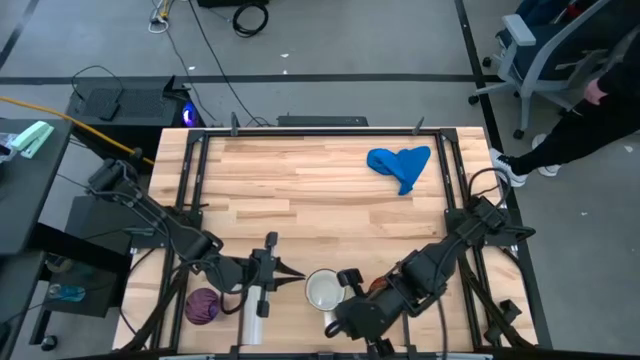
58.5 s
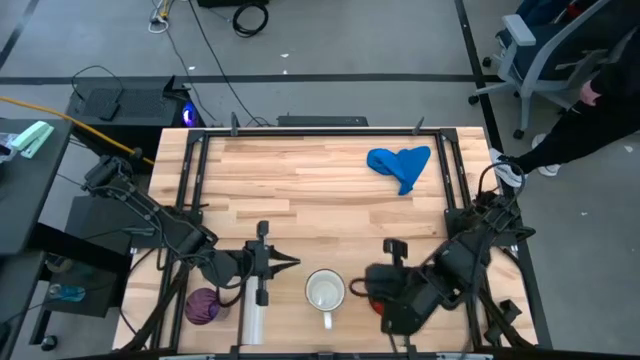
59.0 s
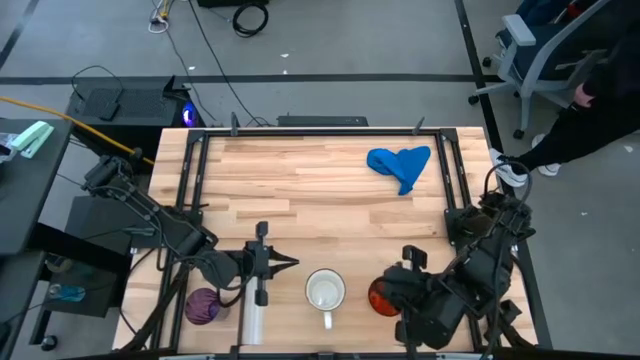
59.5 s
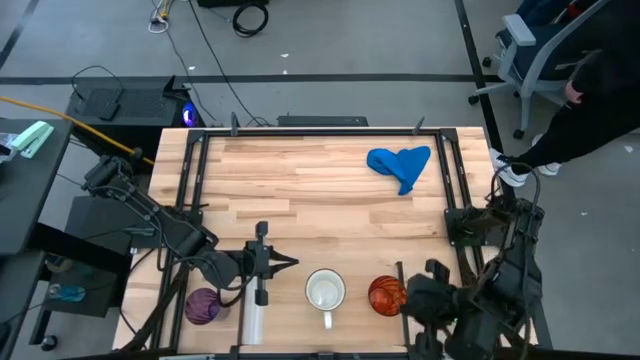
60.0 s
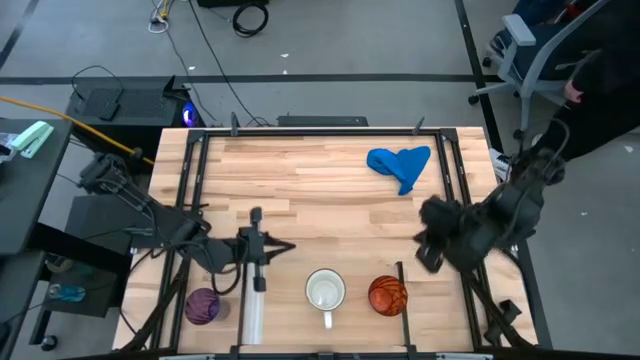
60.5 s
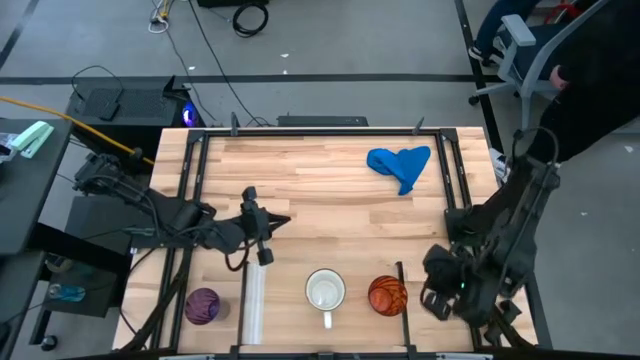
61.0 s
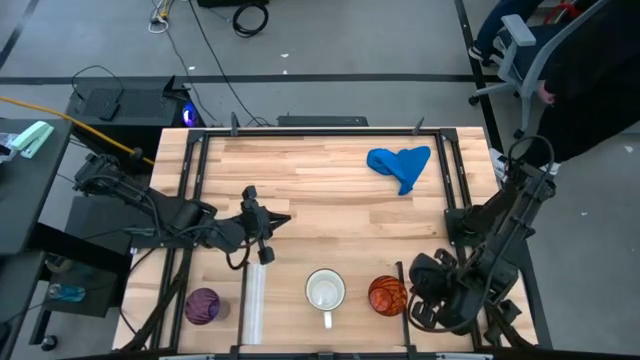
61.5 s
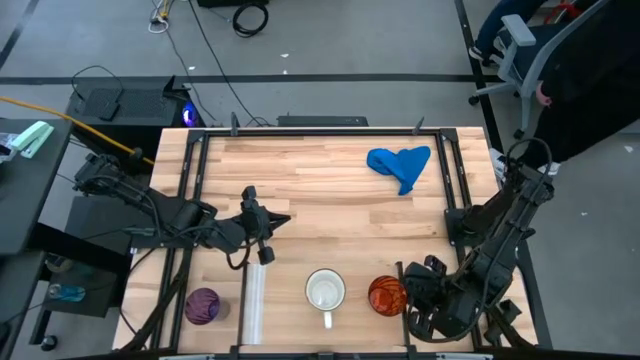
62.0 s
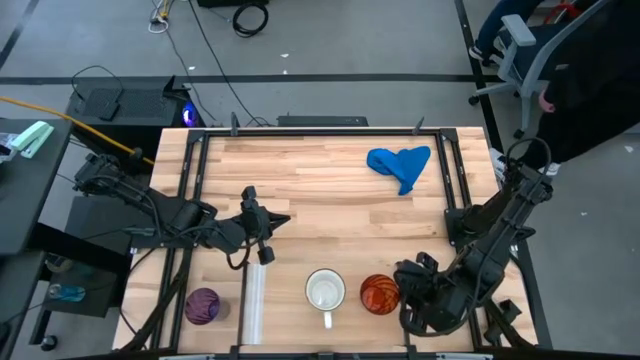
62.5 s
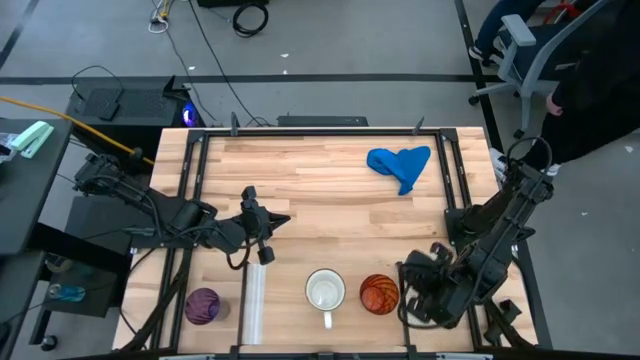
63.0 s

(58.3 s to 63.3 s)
Task: Stack small to large cups/mugs on shelf
Adjust the orange cup on the shelf

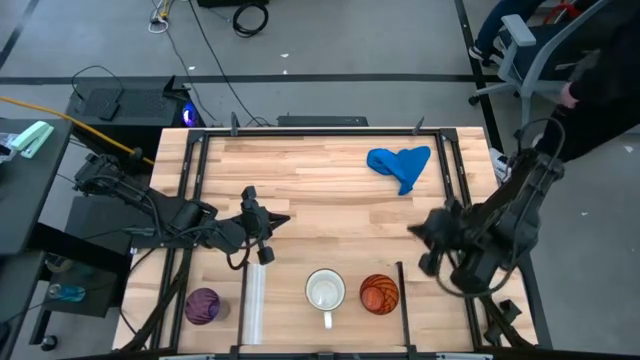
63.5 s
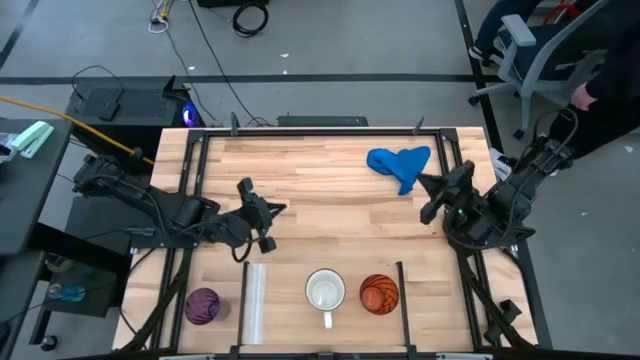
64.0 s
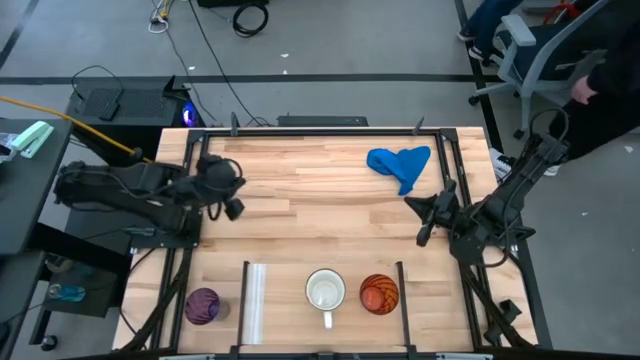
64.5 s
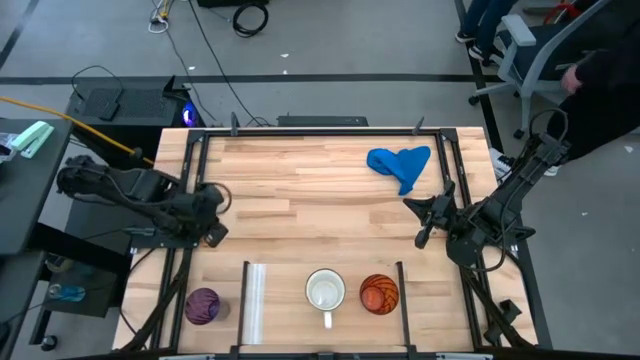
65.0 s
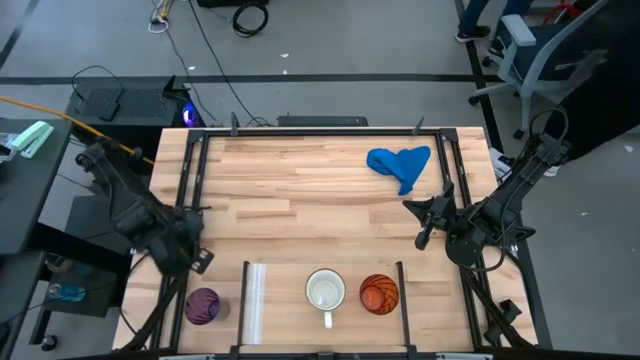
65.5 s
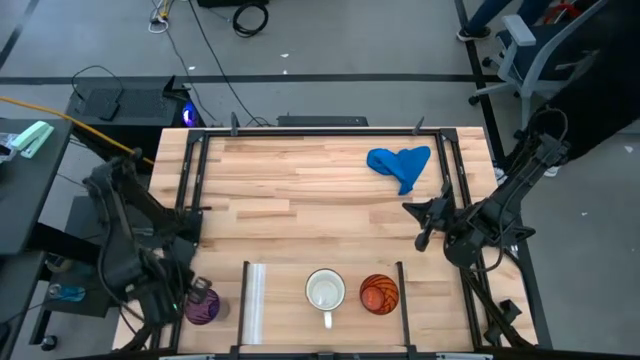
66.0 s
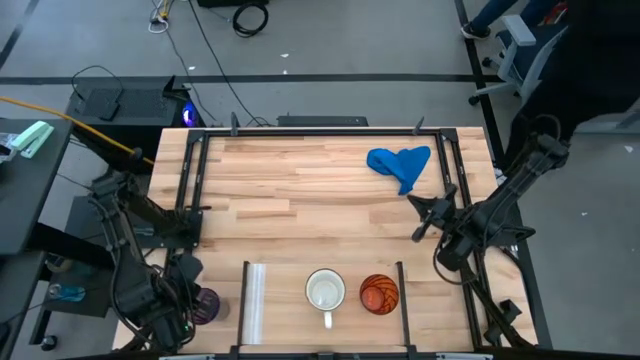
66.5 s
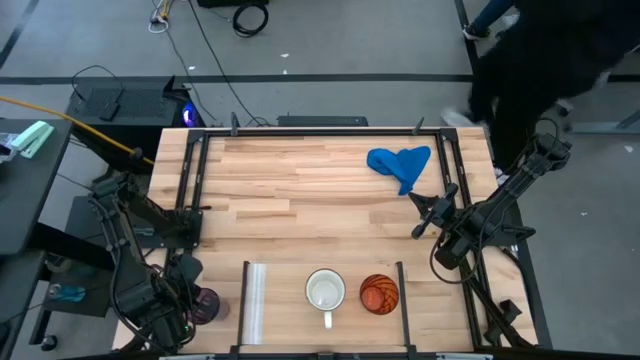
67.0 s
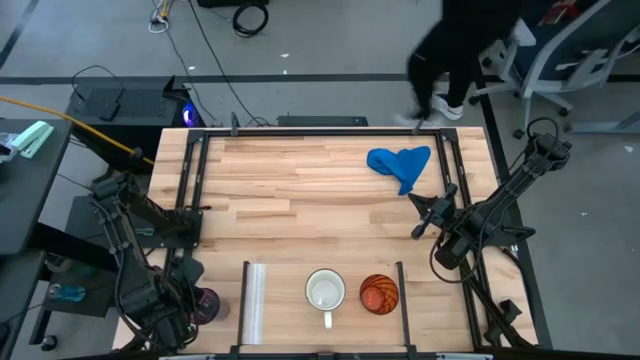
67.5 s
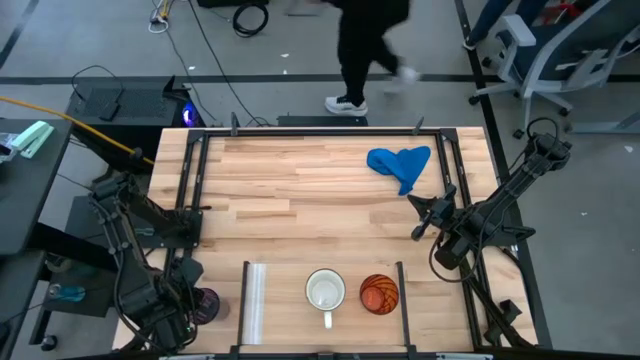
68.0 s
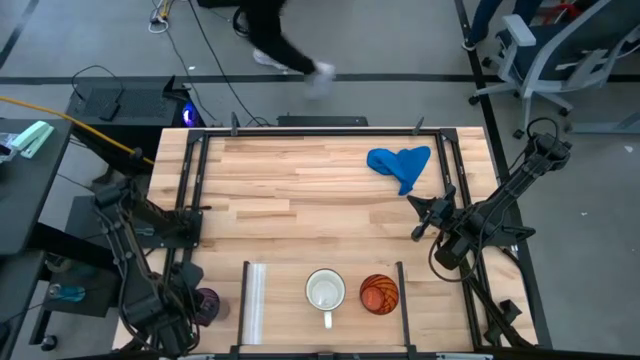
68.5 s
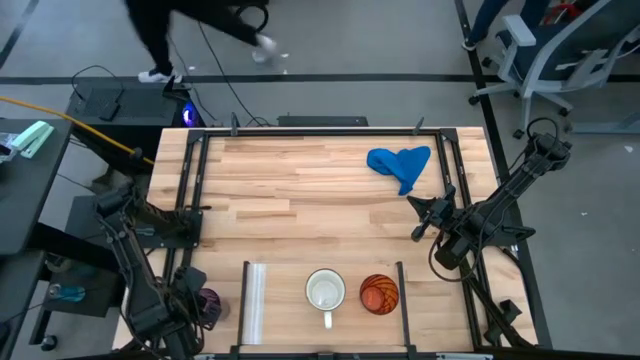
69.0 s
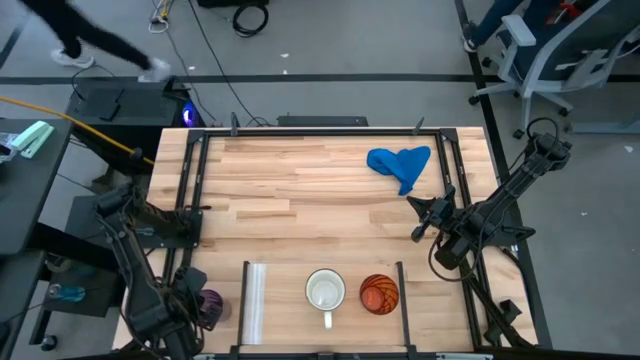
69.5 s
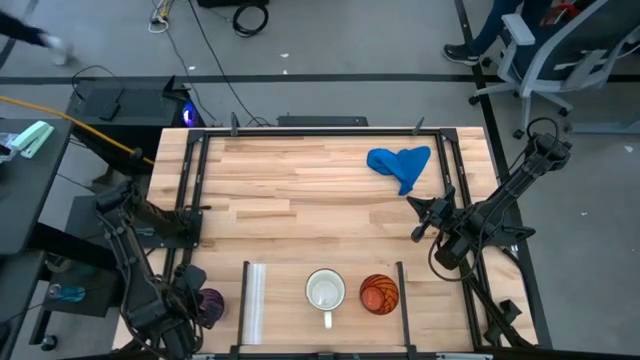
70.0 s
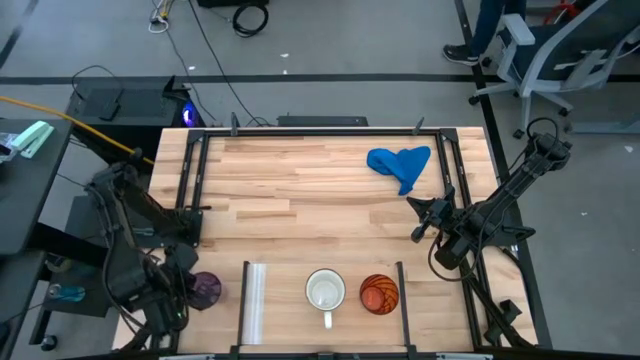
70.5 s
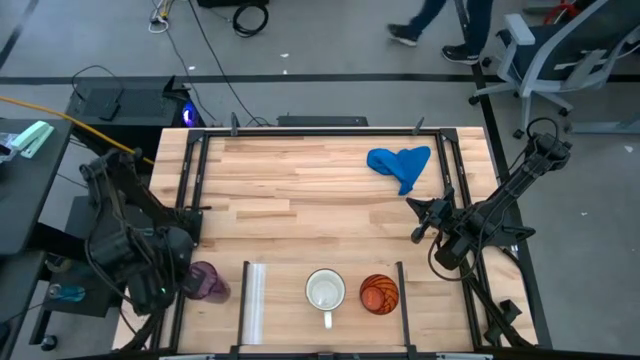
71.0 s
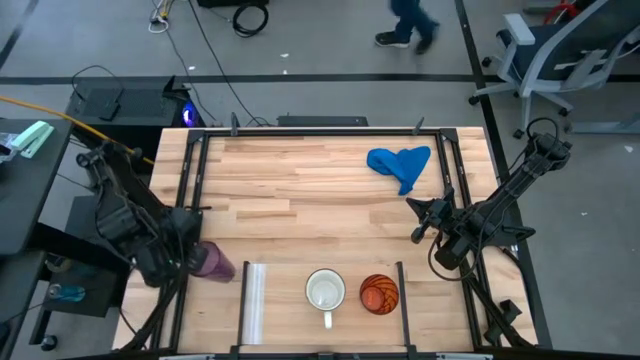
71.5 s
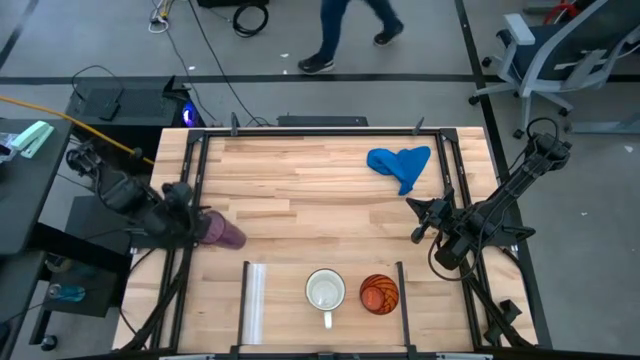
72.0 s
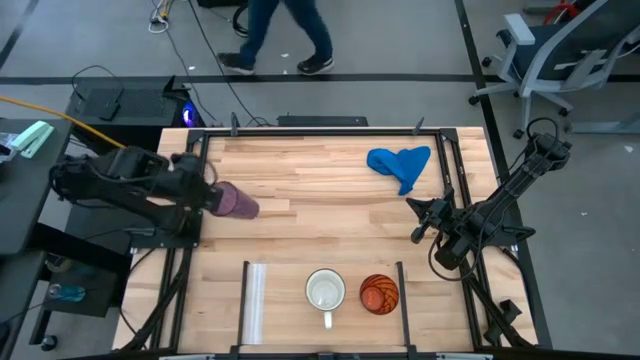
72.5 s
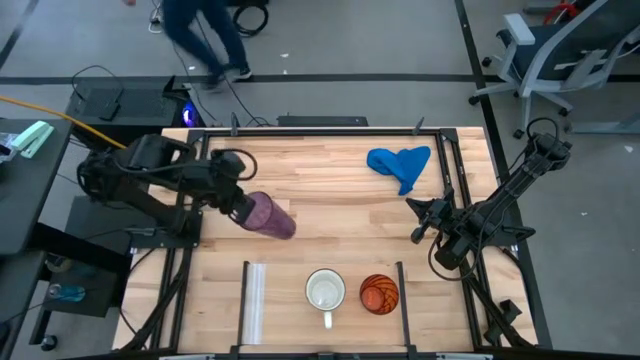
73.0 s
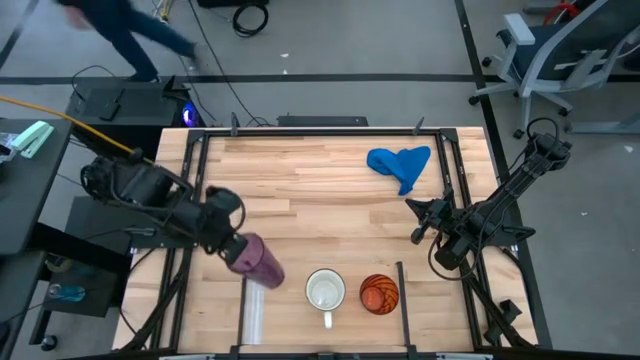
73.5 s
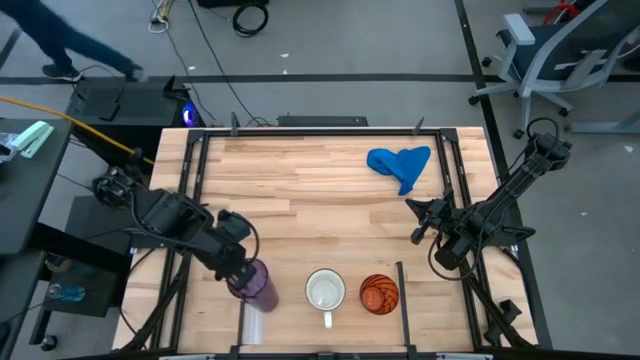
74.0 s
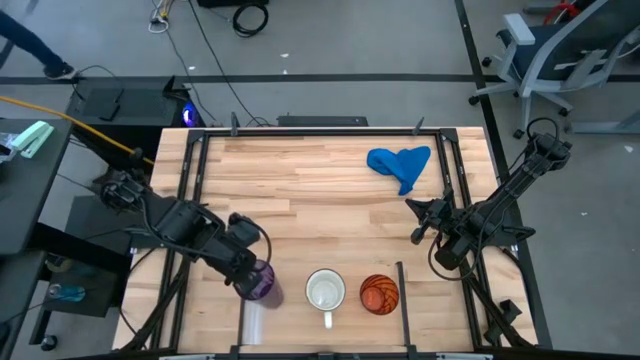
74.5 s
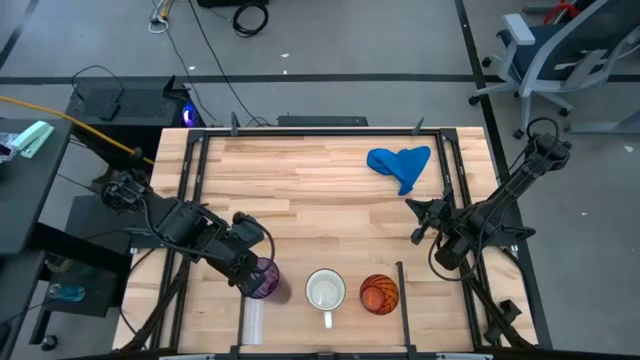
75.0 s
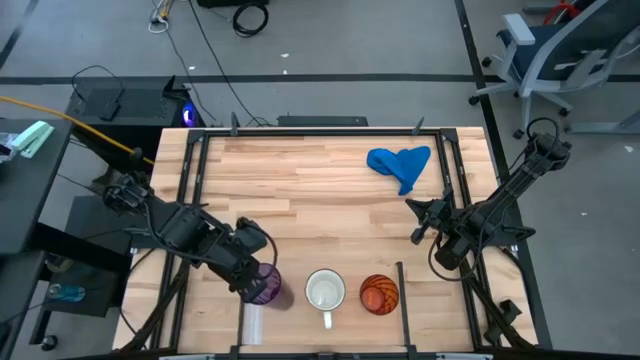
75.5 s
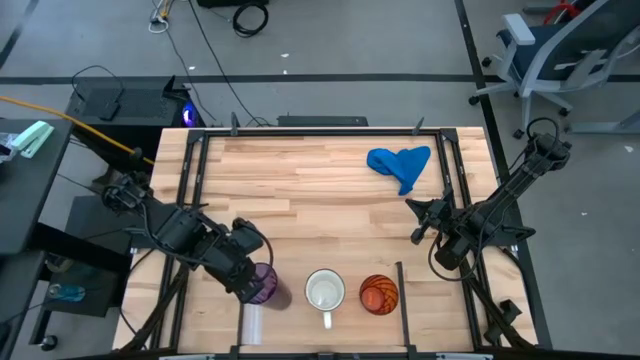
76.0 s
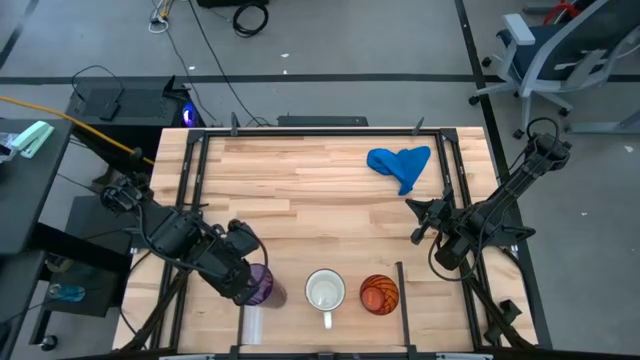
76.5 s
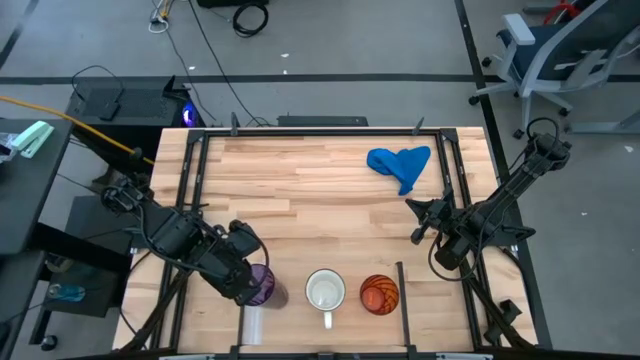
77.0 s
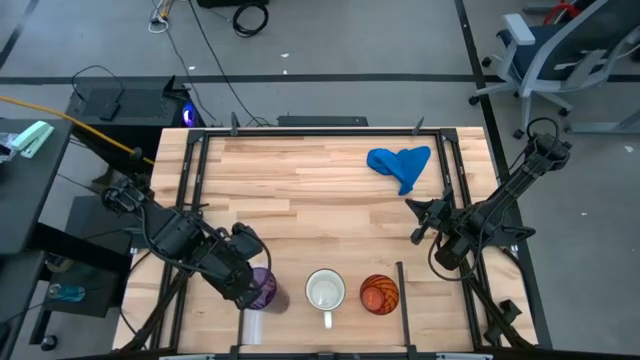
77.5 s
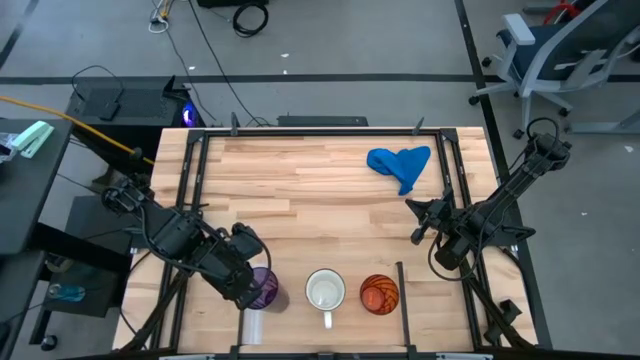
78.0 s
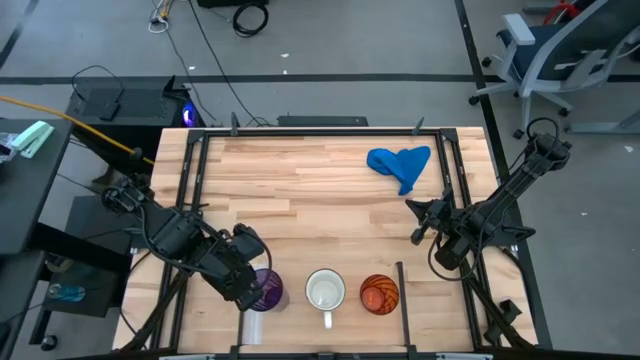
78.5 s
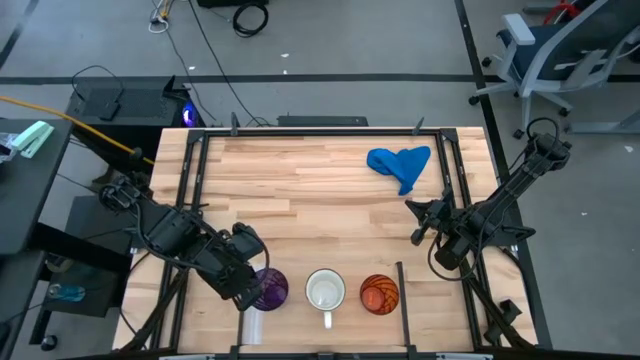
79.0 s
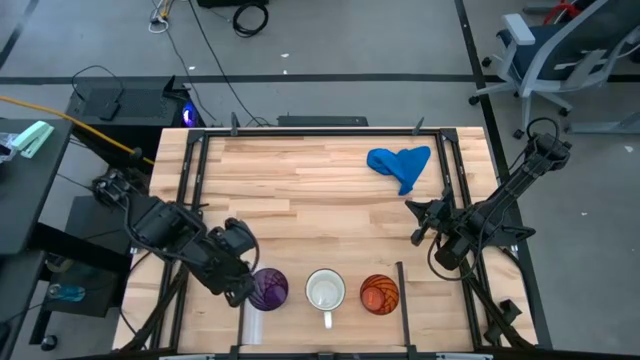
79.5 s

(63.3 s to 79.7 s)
Put the purple cup on the shelf

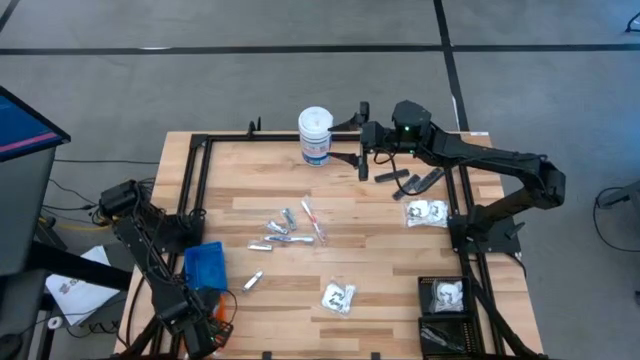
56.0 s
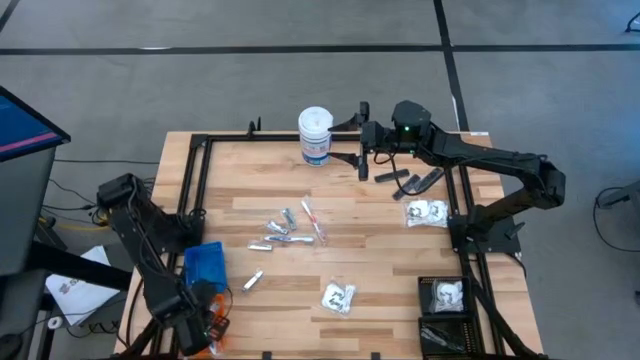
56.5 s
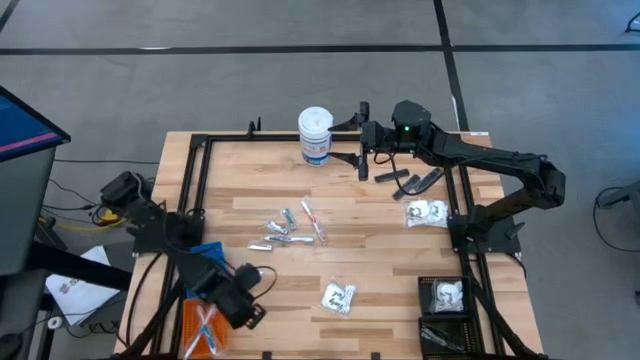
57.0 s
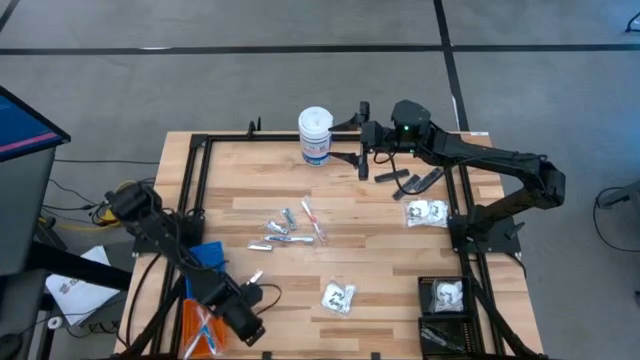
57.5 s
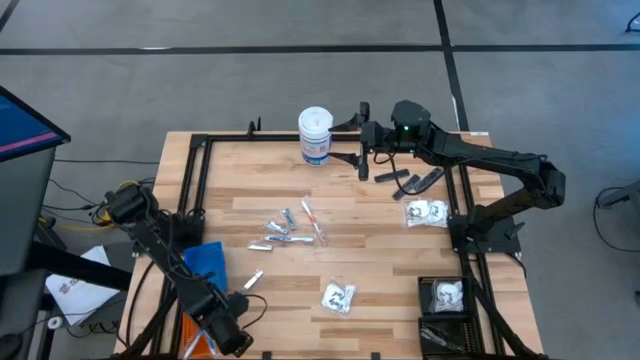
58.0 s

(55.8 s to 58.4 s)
Task: Pick & Place Travel size toiletries
Adjust the orange bin
